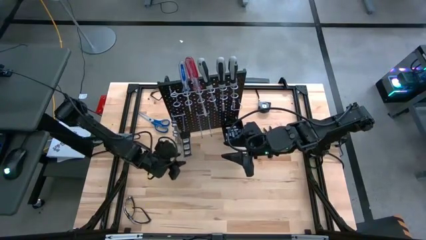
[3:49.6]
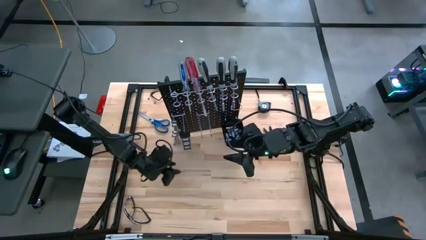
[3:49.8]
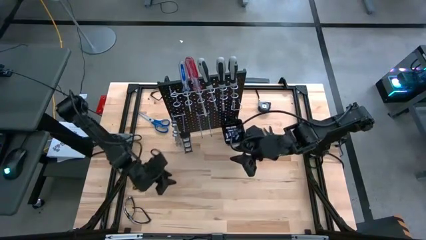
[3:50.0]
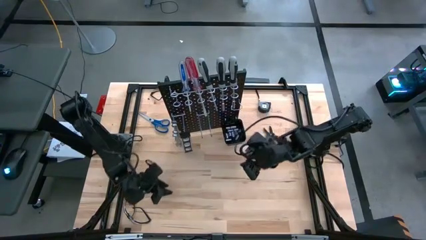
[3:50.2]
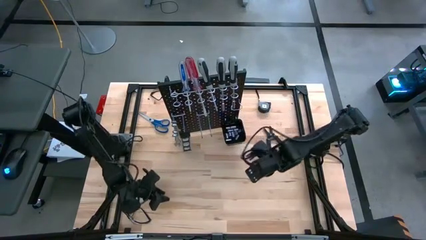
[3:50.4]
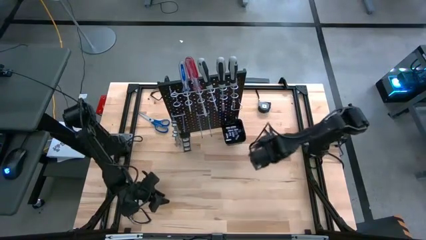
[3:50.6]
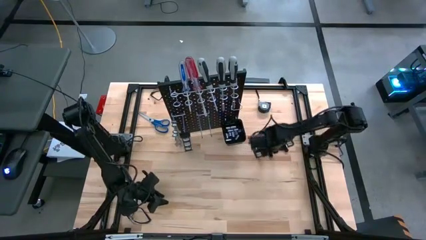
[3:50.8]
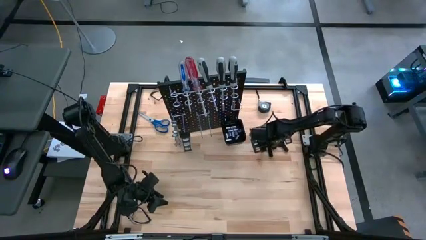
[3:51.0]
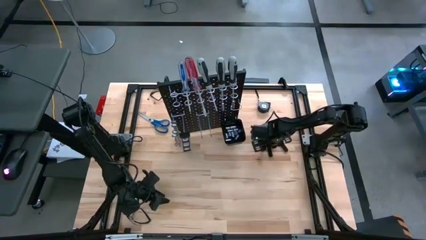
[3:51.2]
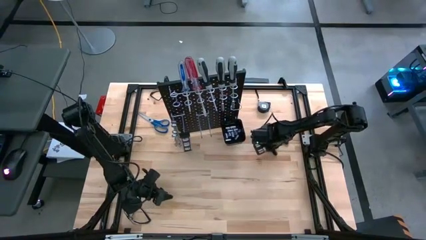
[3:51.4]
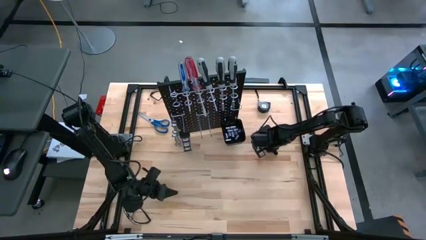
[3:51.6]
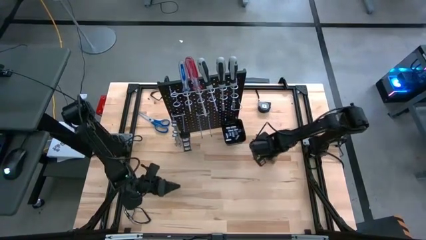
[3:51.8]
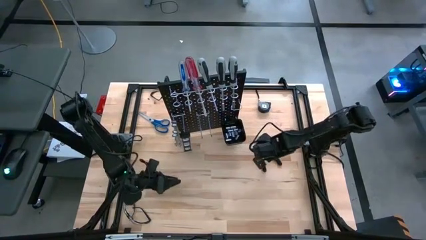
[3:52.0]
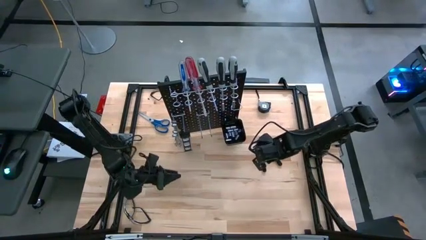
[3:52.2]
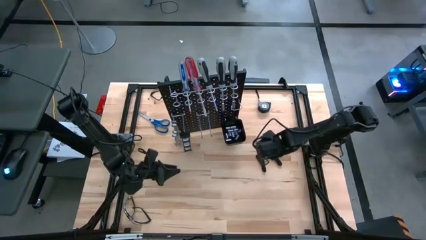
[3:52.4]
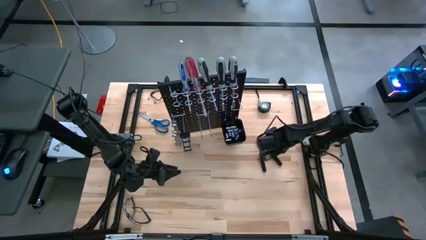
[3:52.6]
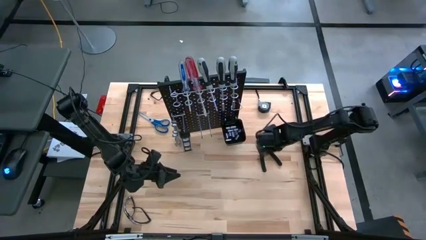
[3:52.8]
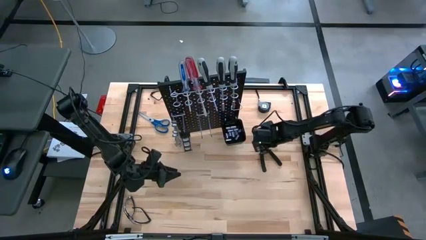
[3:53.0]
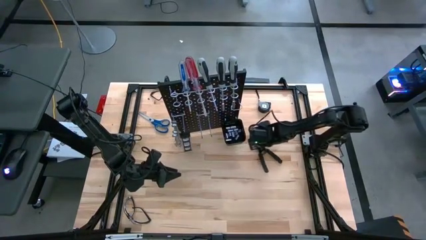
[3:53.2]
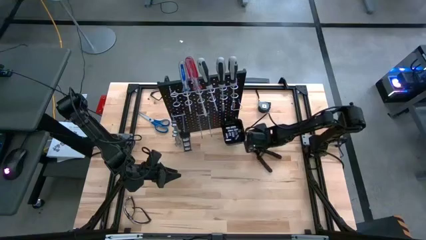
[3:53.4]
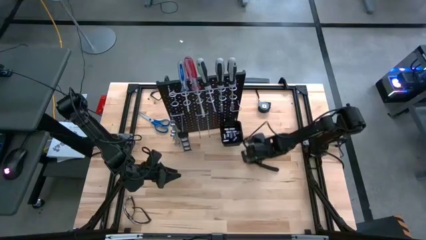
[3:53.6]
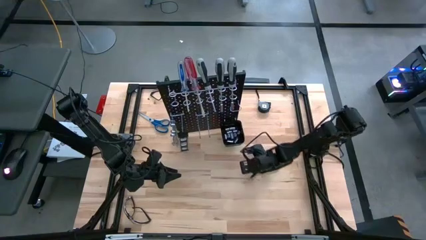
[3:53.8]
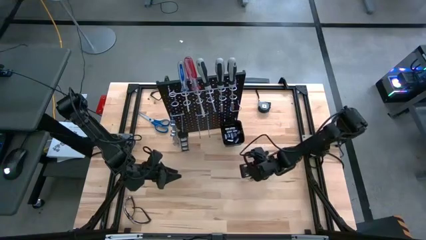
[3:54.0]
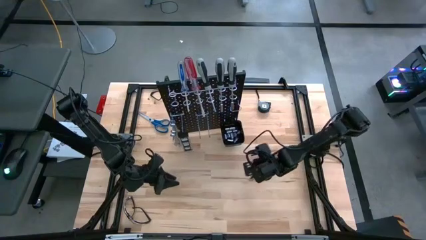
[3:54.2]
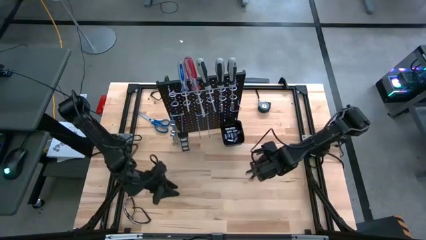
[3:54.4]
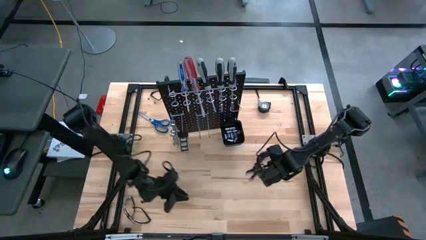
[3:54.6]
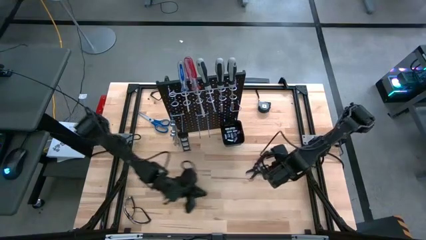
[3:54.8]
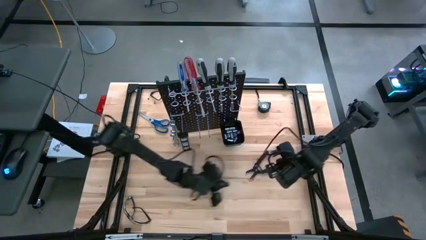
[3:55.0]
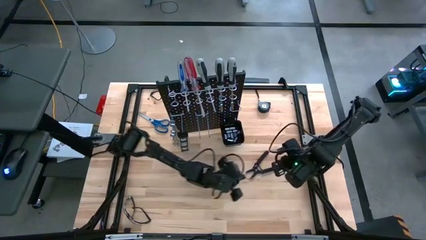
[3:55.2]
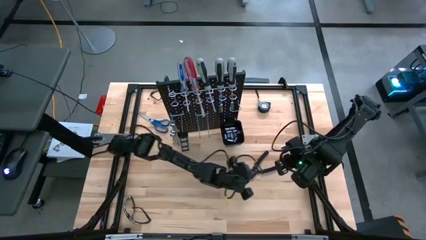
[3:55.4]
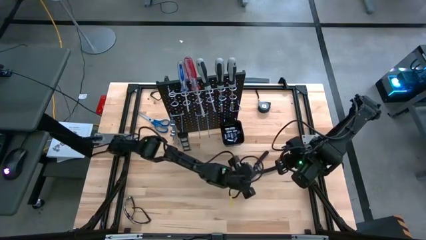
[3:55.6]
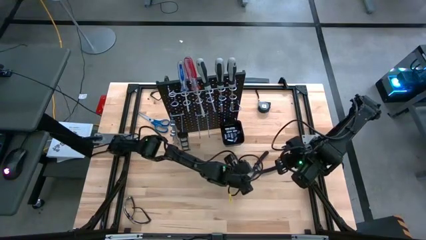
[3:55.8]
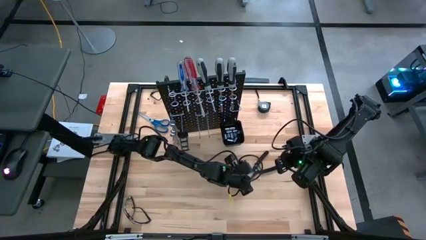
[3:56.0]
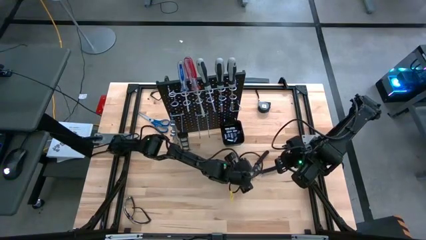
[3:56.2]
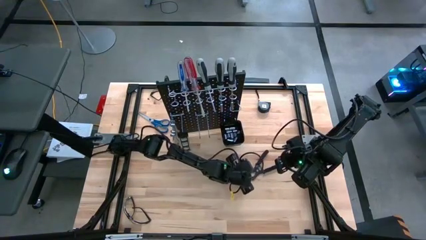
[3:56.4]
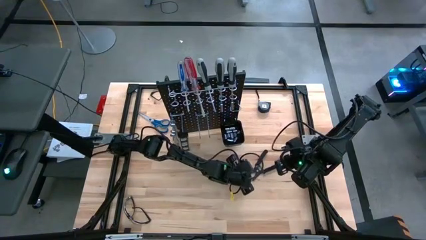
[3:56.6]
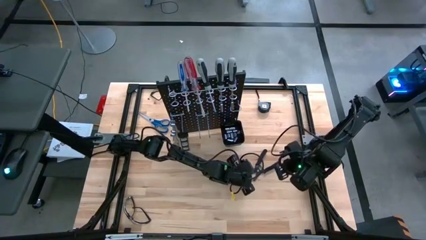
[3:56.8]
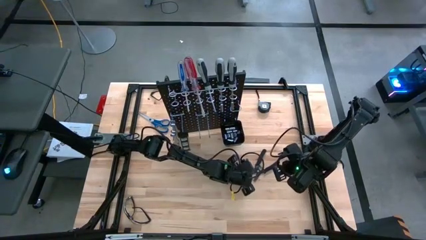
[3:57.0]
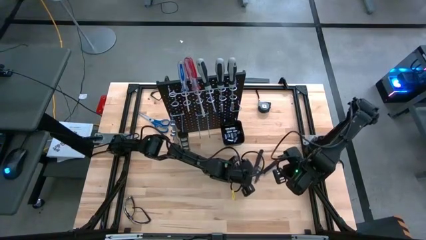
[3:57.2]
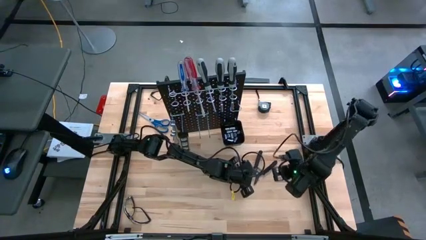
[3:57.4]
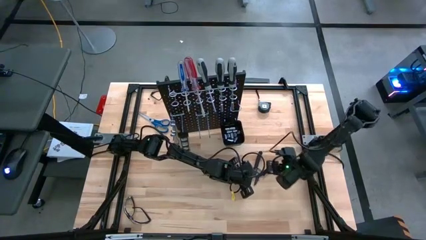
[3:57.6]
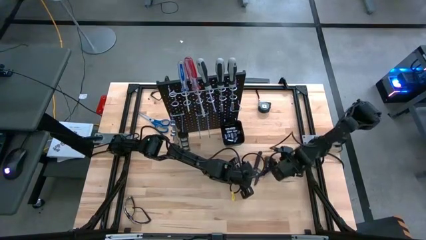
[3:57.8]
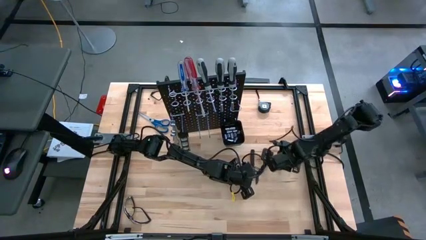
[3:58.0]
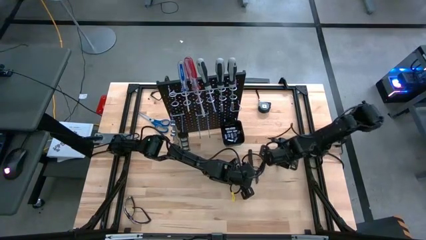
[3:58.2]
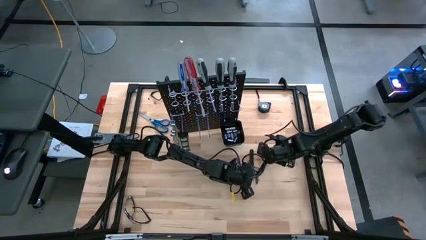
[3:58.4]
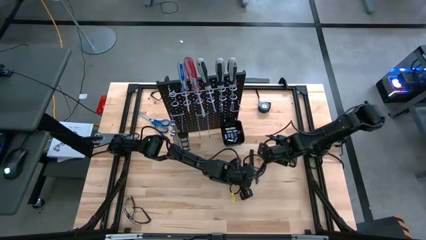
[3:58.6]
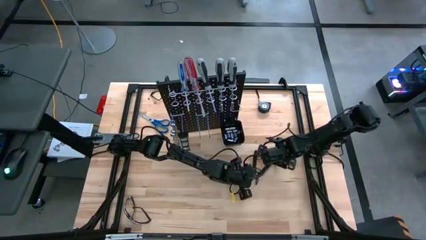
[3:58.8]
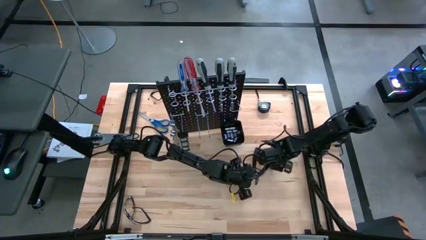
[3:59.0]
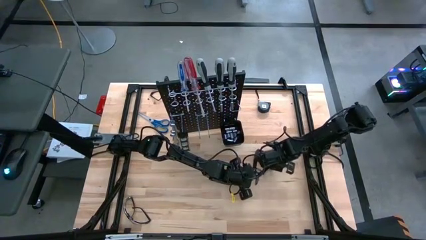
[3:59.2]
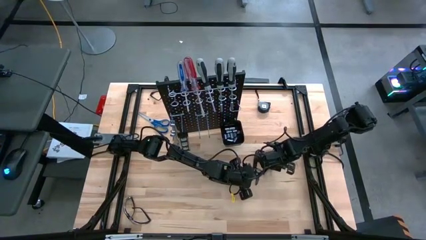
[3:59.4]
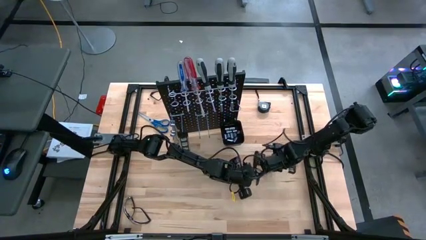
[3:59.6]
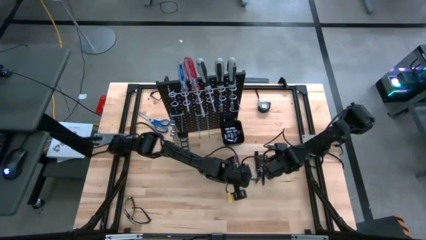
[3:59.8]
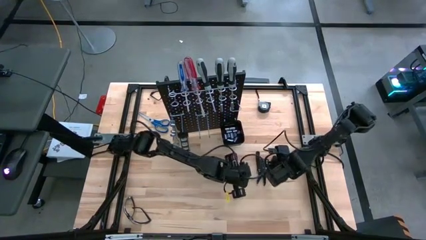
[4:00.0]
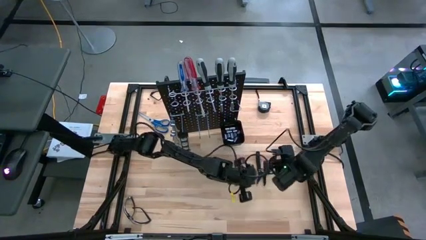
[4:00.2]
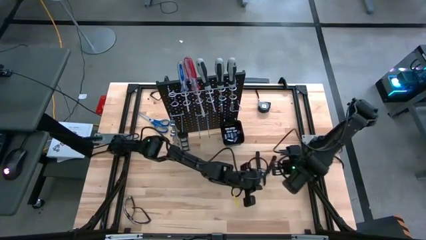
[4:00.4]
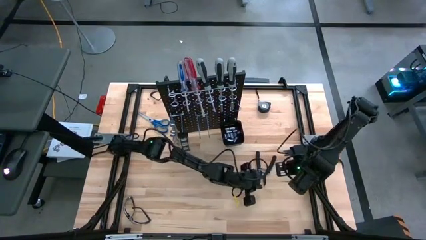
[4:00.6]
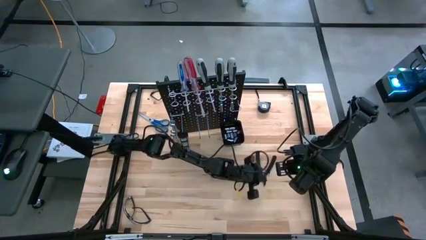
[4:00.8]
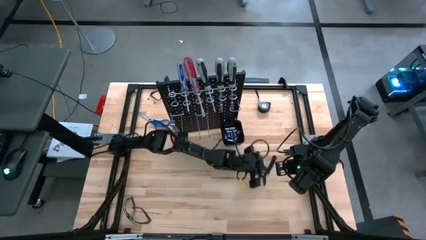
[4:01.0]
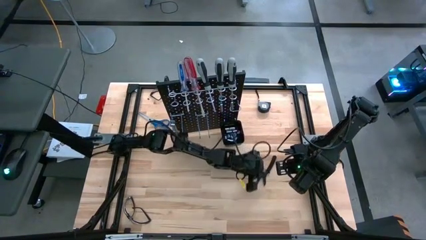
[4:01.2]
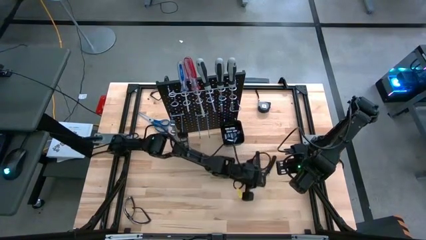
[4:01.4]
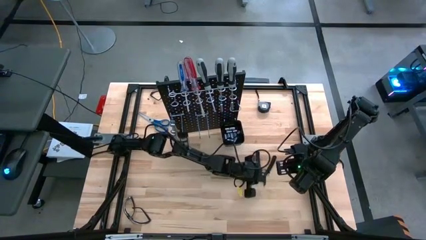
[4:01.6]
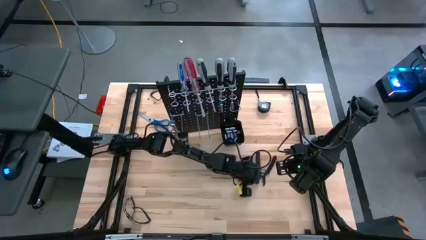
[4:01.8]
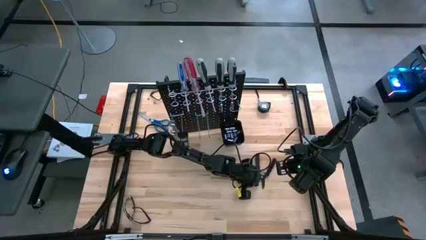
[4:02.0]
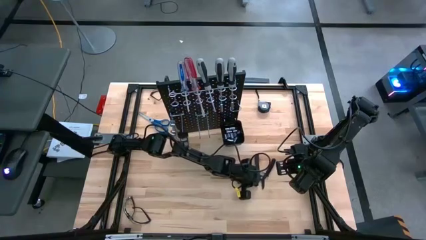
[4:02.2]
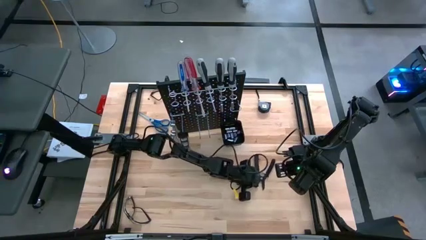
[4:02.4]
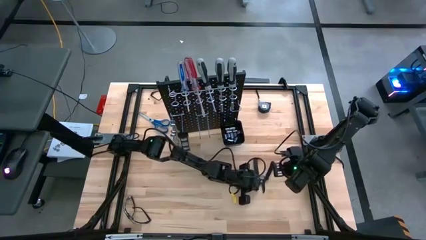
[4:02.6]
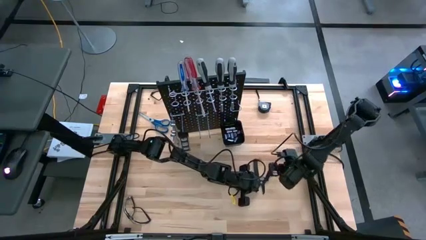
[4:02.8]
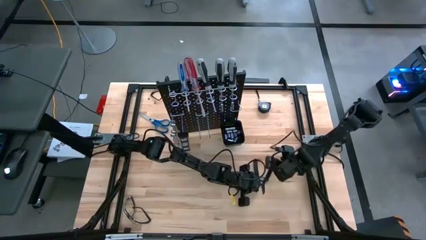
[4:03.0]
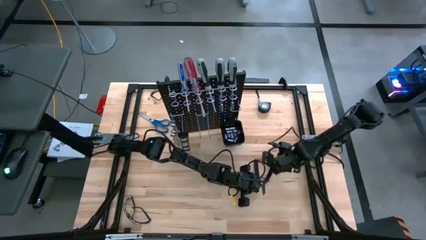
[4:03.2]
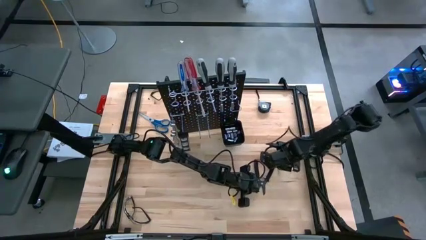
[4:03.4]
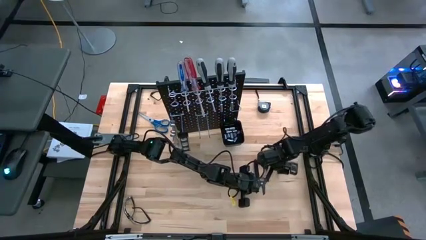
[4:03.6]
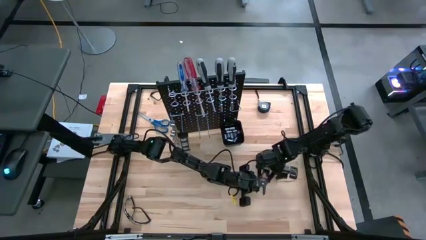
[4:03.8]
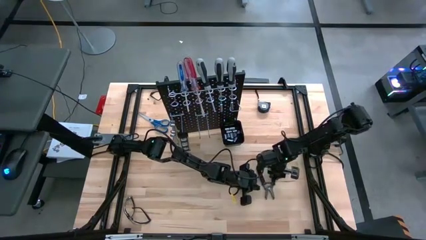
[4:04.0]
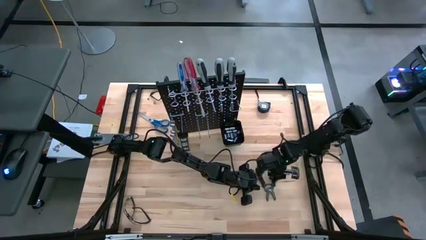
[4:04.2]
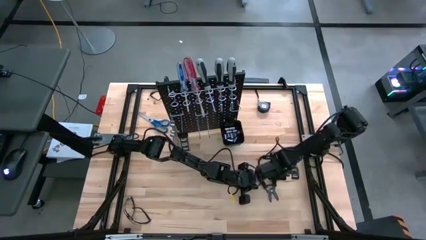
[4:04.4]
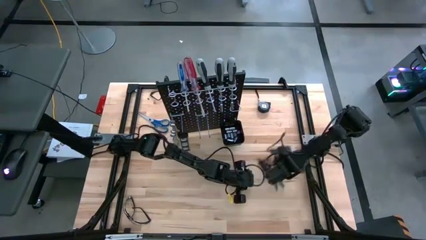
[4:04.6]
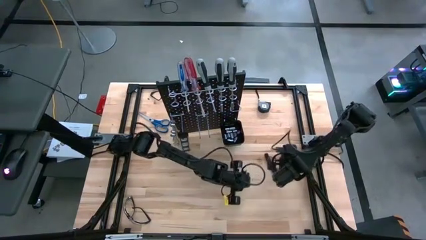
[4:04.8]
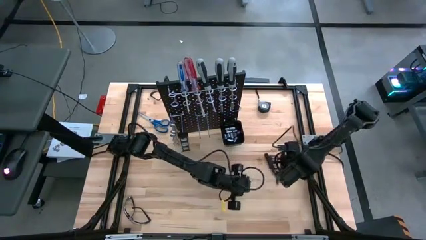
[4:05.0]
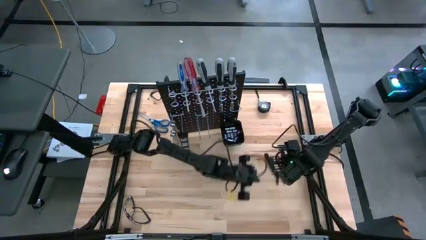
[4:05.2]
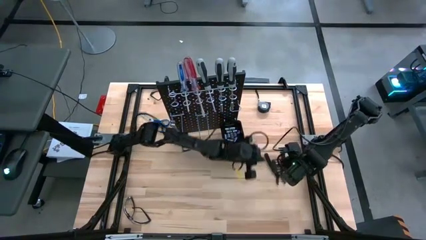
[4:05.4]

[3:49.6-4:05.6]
Task: Hang tools onto peg board
Hang the black pliers on the pegboard
